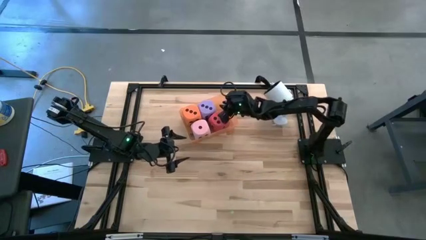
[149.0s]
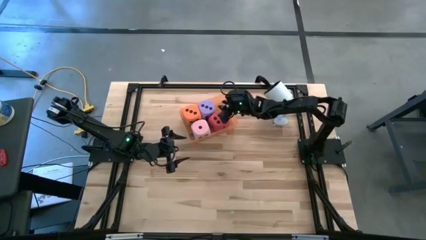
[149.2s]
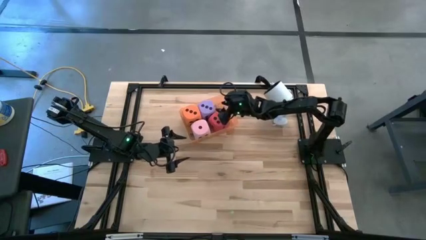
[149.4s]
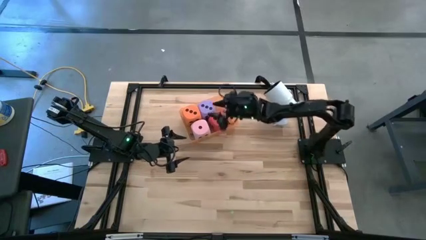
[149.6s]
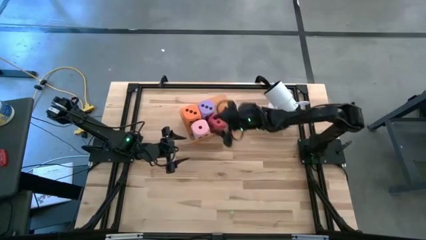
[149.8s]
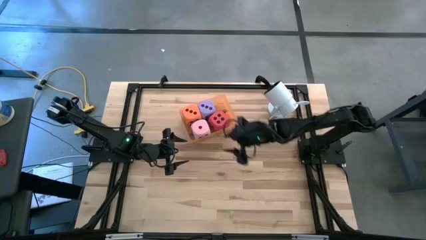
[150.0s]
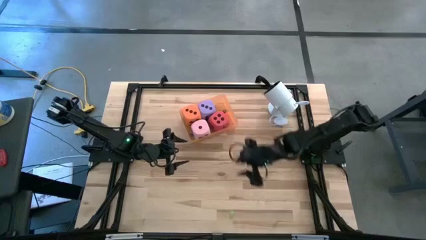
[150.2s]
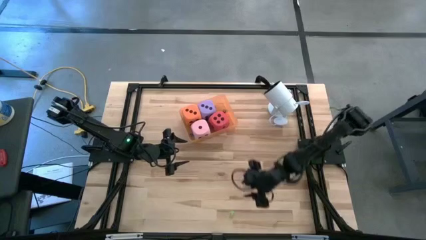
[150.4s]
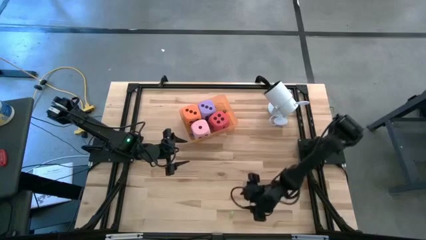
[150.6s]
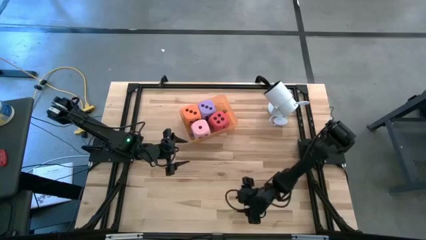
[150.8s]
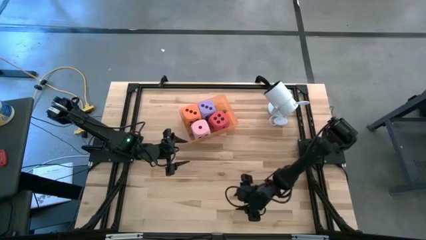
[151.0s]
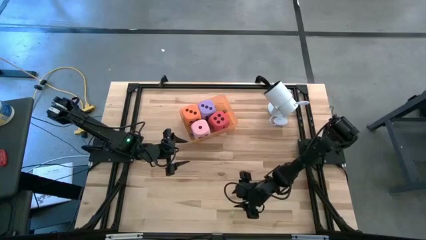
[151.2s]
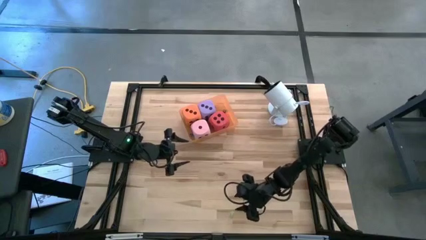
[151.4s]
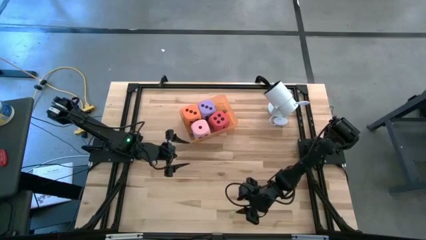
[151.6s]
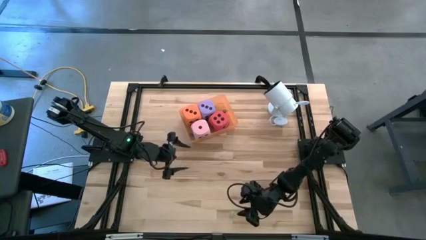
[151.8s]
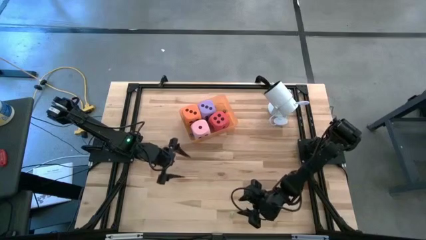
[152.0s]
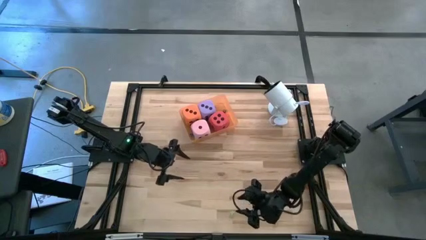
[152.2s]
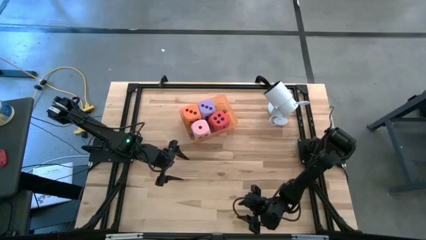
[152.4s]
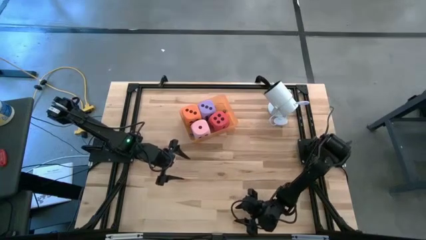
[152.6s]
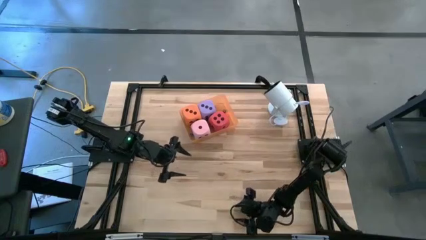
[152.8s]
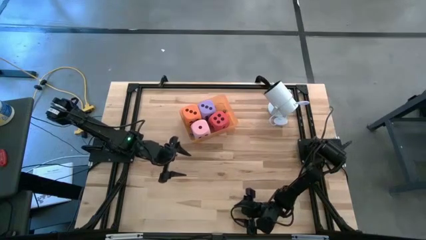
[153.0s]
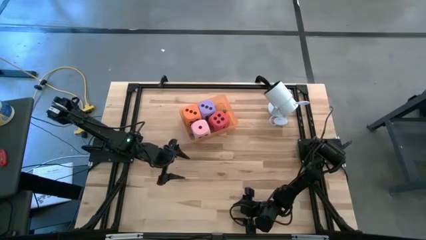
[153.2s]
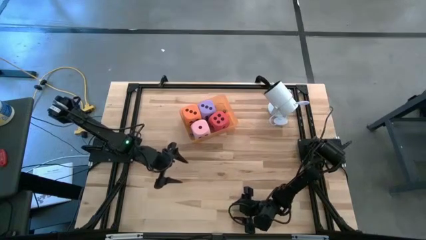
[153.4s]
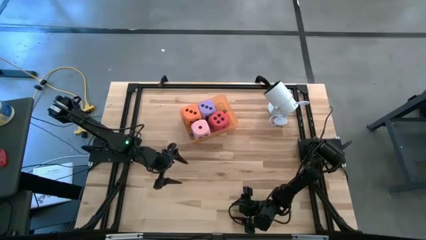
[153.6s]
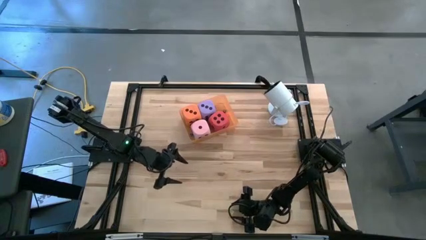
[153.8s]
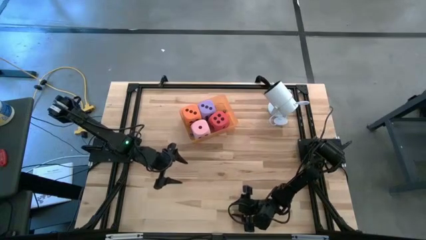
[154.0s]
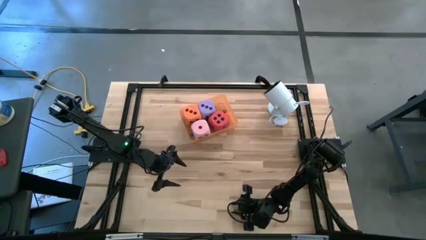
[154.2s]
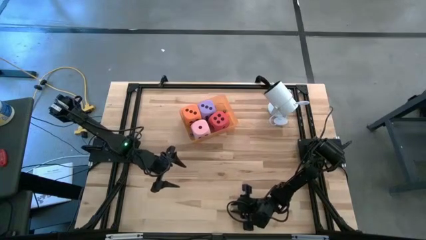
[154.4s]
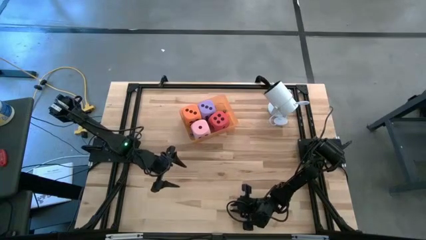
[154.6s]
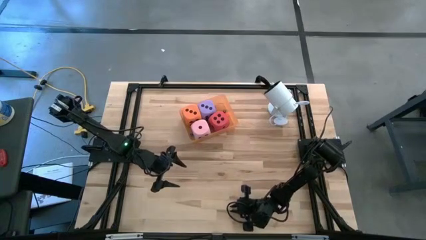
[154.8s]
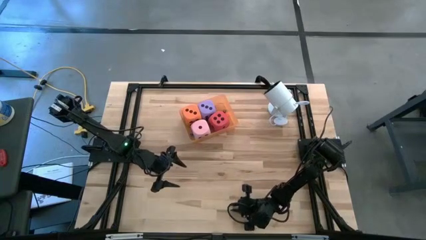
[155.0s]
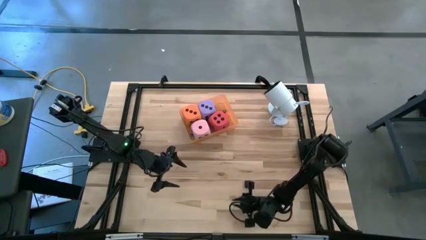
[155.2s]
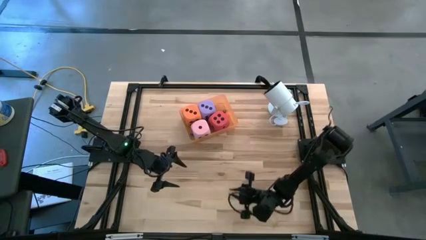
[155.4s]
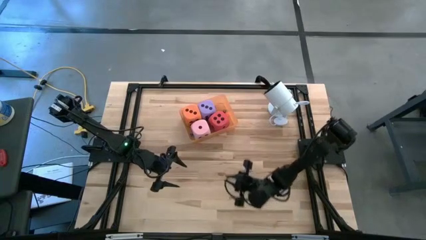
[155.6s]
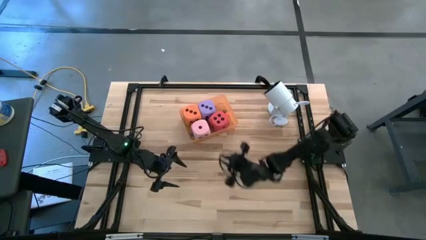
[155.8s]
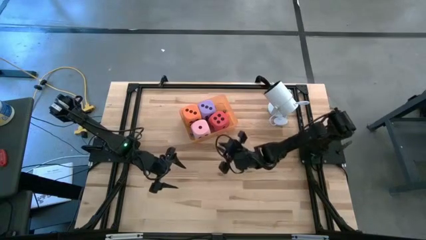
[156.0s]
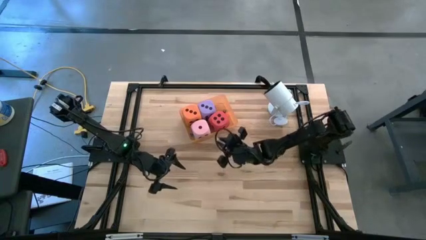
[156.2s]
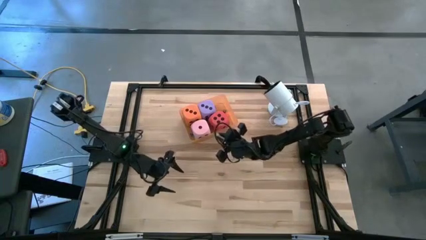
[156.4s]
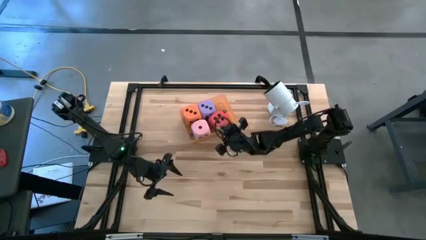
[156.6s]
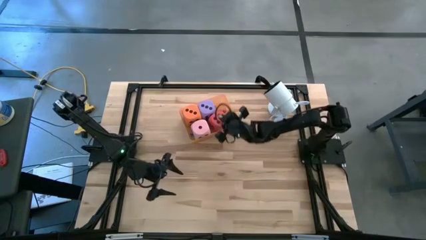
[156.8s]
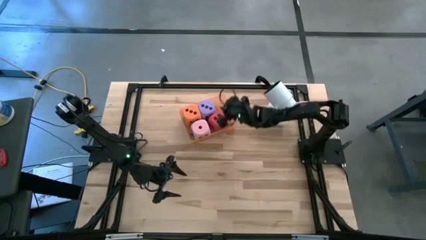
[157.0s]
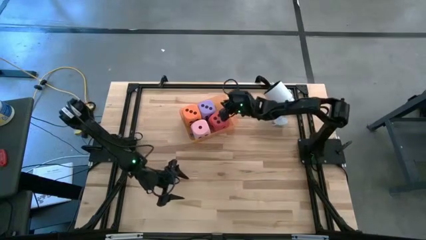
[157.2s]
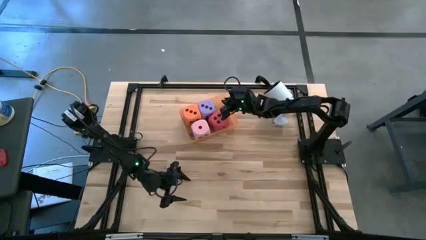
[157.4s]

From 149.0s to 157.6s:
Task: Pick & Place Dice
Put the small green dice in the orange bin

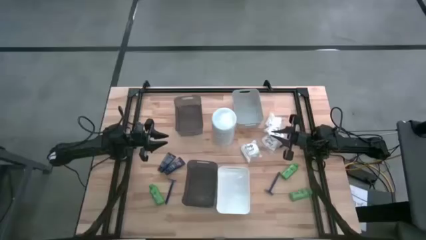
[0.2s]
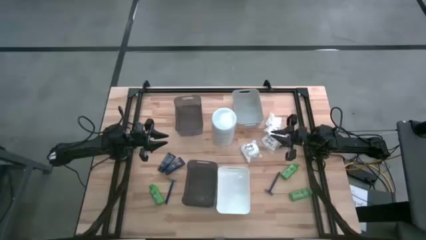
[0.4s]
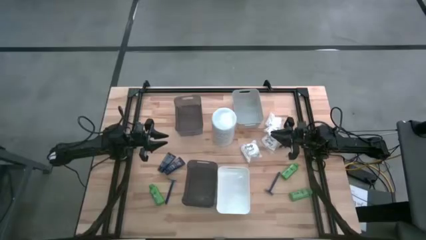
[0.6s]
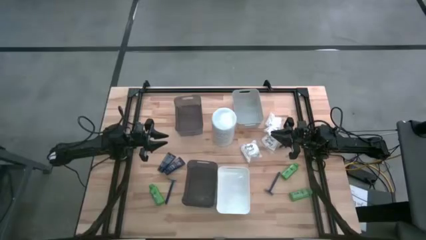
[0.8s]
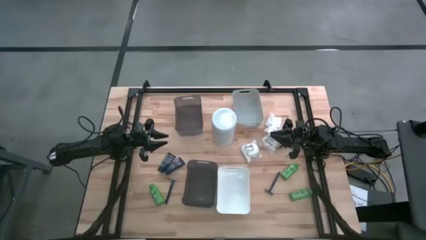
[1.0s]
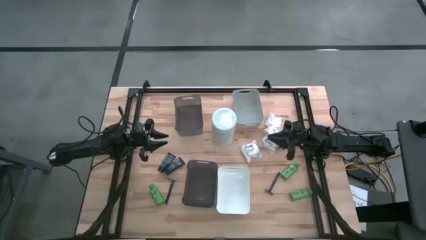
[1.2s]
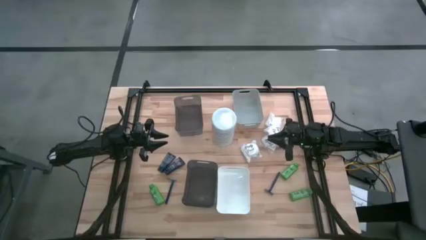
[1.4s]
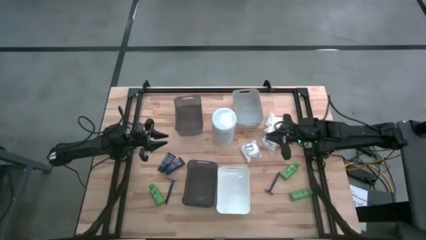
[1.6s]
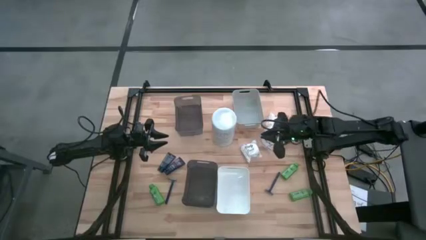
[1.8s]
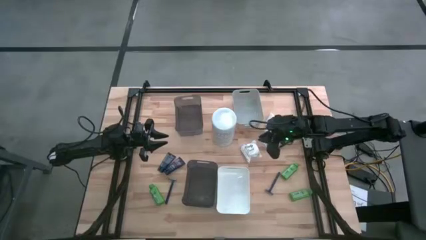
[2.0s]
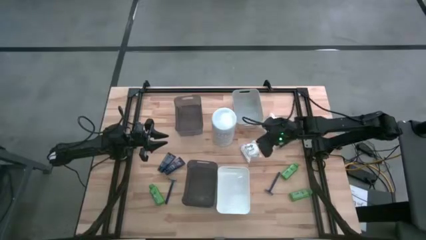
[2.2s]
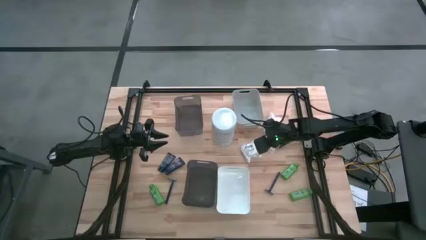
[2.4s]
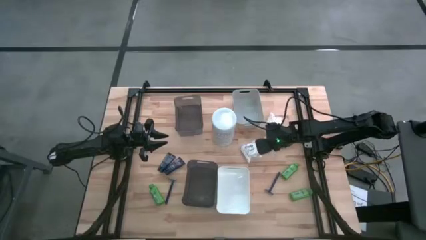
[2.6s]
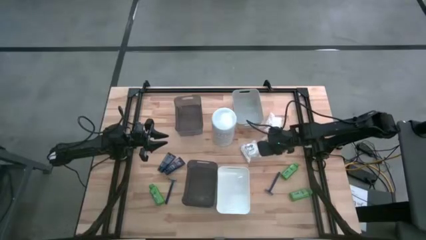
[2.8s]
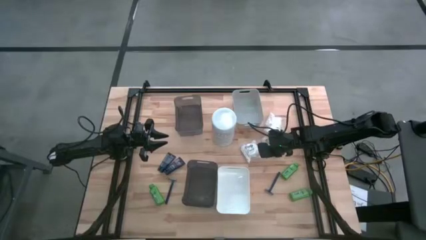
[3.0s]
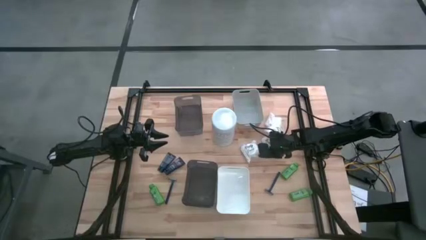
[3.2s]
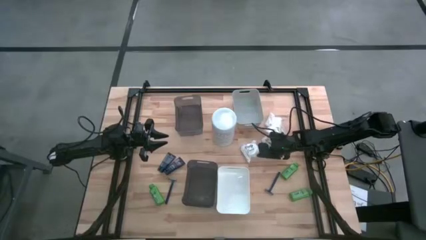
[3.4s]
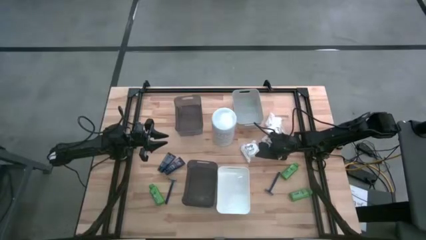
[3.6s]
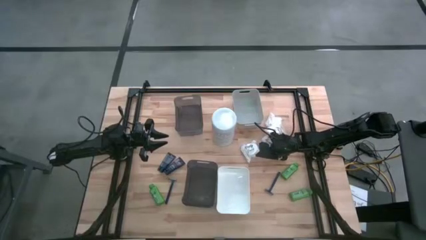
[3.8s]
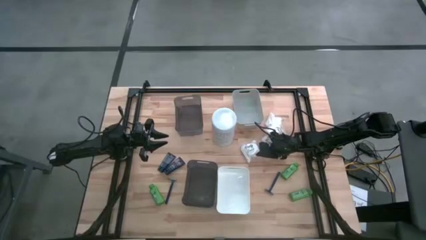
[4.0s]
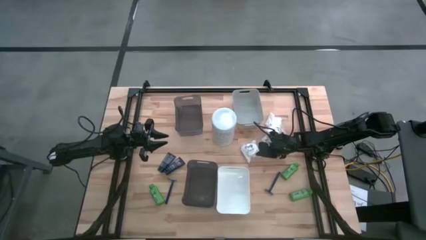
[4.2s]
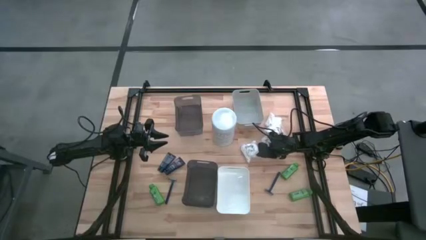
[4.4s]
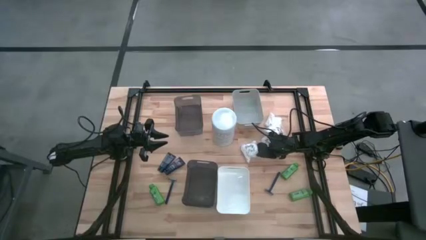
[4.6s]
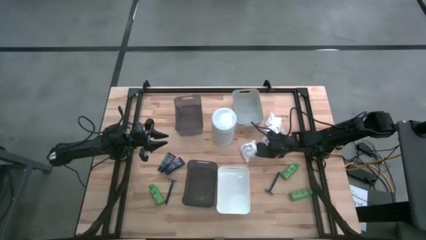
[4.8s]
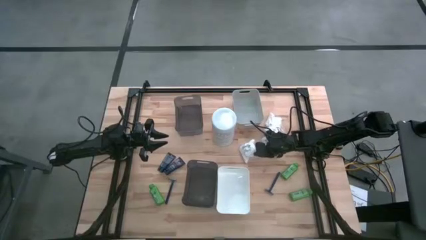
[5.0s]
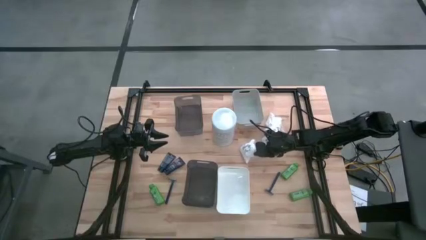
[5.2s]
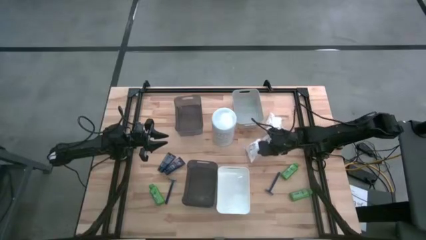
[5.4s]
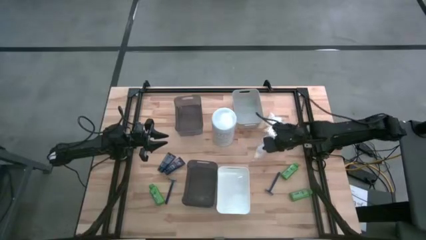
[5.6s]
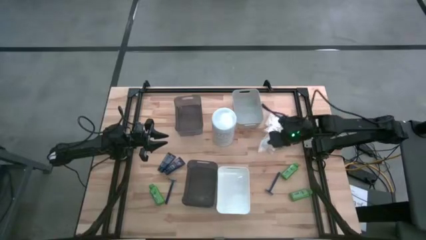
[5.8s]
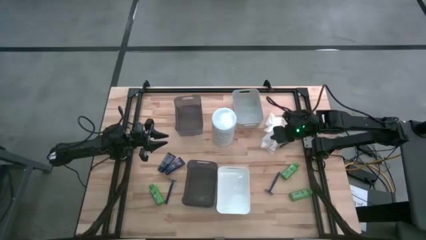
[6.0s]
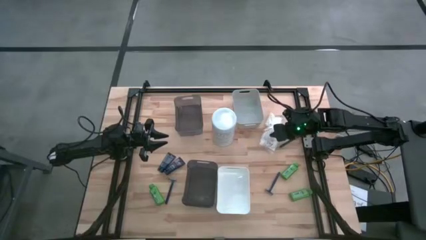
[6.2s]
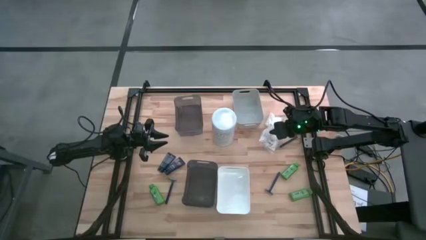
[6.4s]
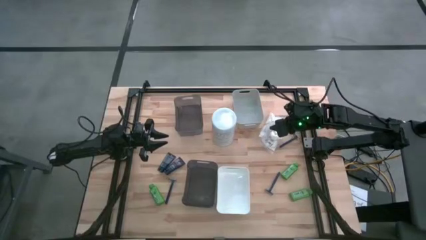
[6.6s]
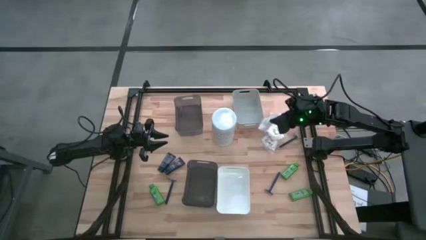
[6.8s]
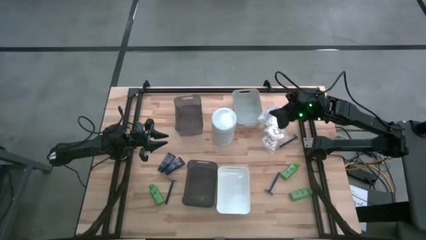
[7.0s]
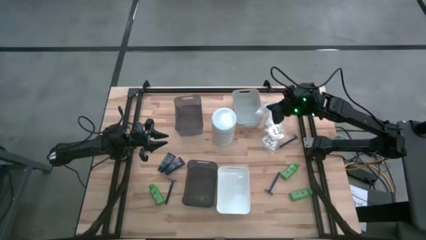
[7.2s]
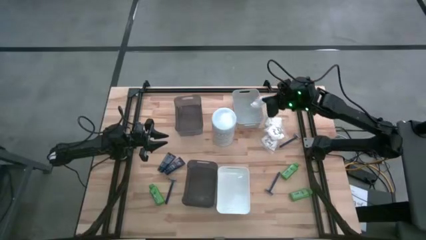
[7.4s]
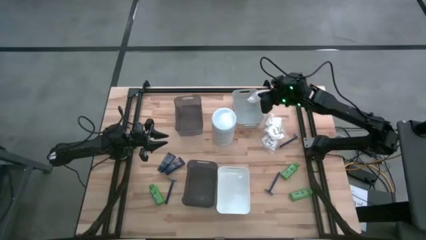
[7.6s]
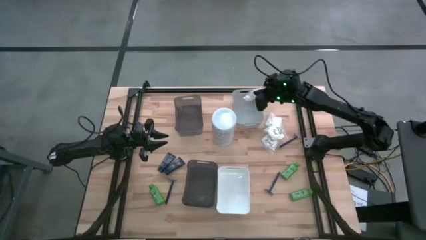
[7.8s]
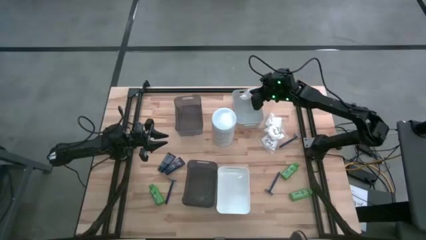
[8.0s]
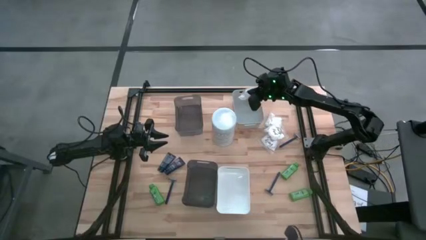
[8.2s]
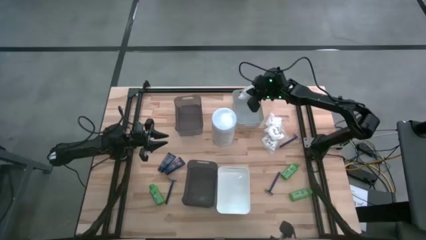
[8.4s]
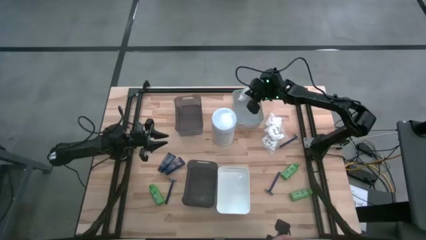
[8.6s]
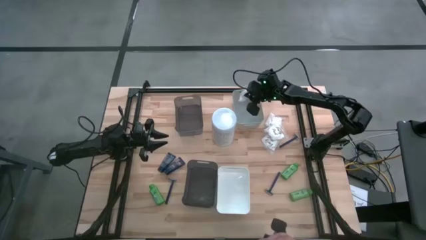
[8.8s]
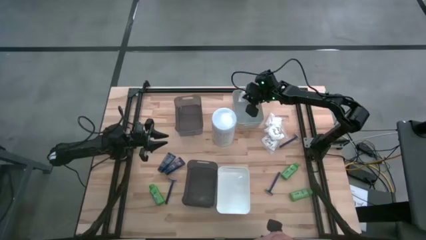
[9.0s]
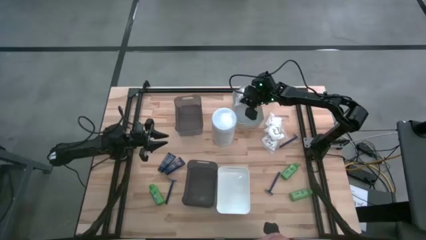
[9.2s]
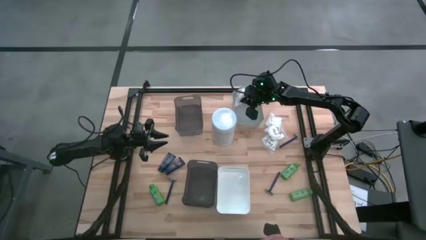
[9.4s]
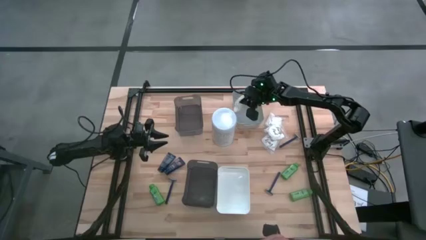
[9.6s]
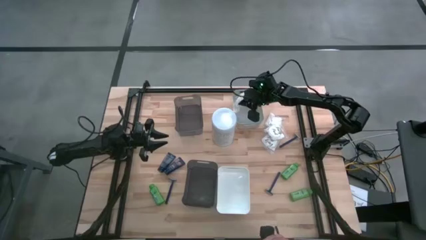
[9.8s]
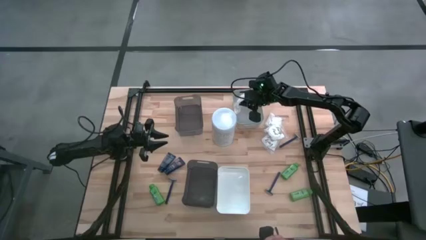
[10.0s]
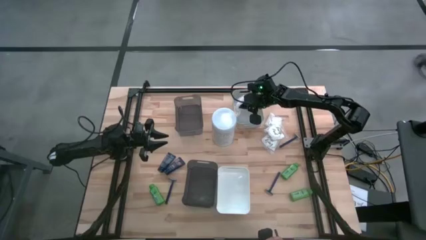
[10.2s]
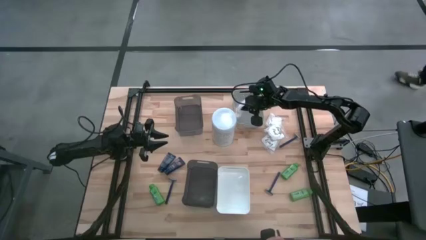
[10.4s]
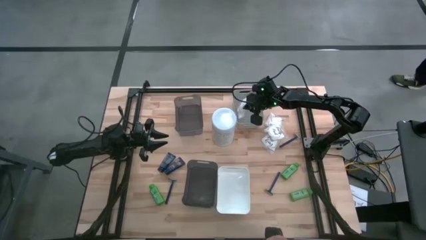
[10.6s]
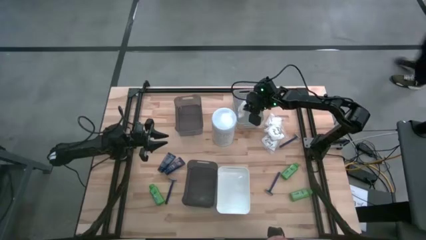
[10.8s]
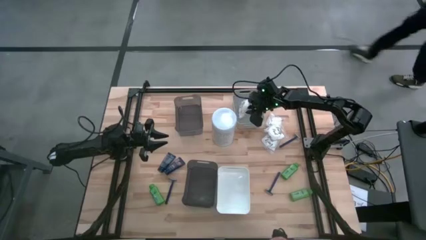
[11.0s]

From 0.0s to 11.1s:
Task: Pick & Place Travel size toiletries
Put the white cotton pack into the gray bin
